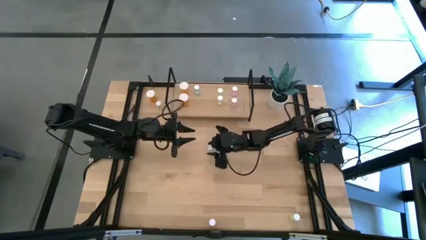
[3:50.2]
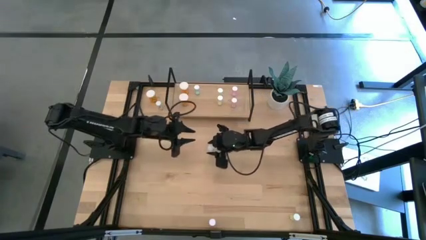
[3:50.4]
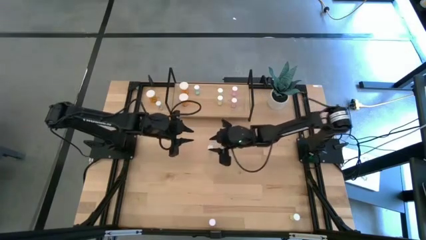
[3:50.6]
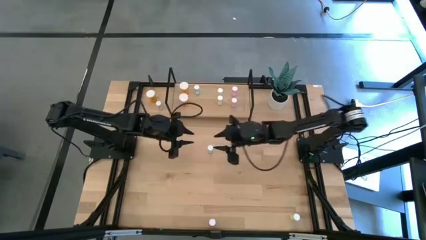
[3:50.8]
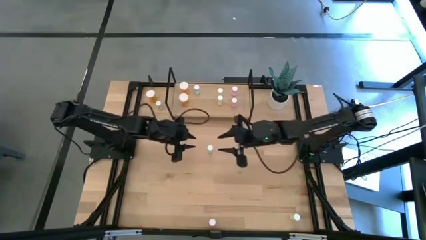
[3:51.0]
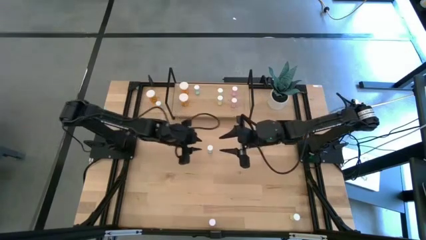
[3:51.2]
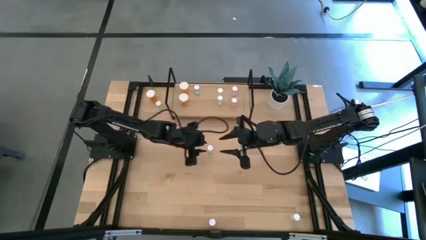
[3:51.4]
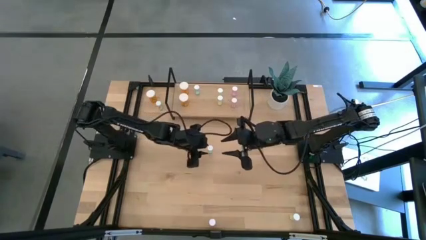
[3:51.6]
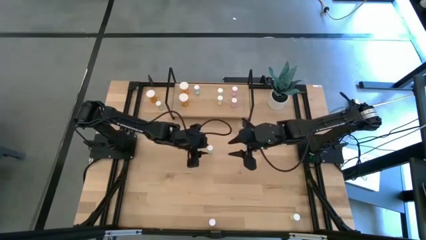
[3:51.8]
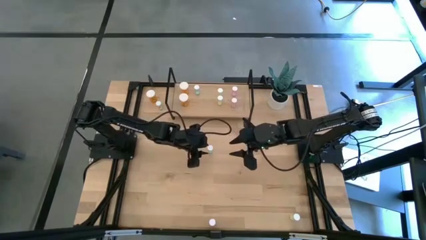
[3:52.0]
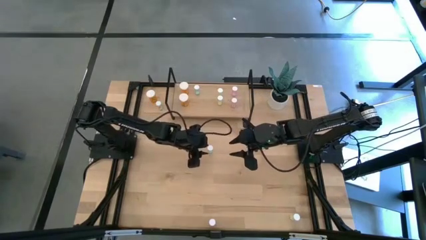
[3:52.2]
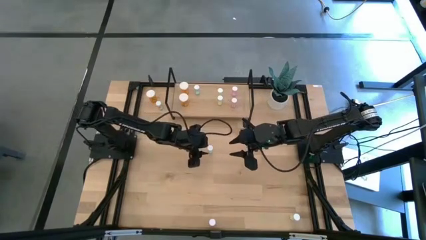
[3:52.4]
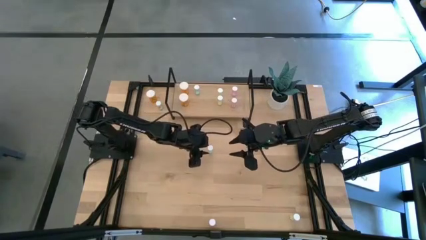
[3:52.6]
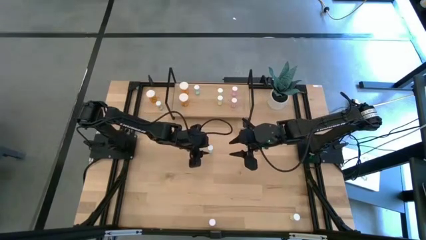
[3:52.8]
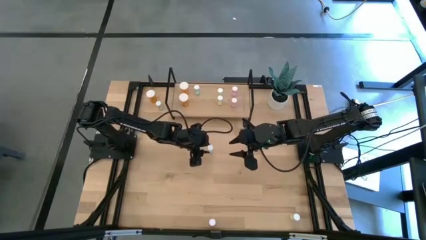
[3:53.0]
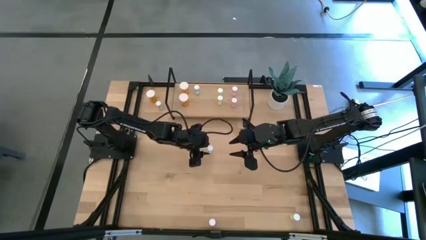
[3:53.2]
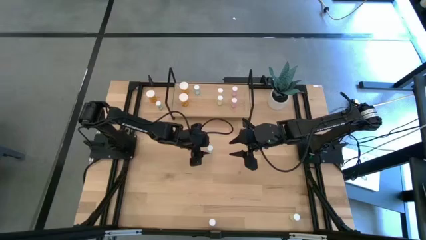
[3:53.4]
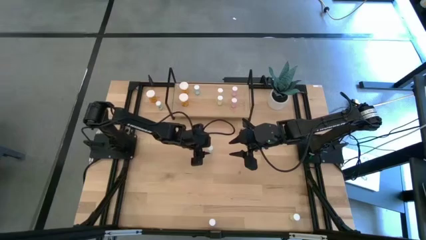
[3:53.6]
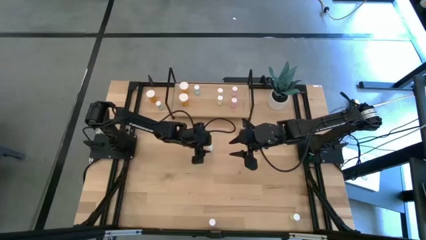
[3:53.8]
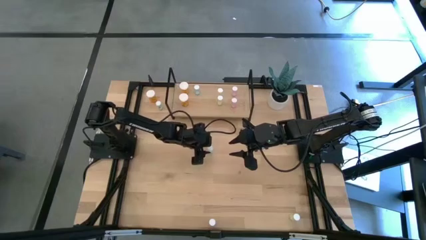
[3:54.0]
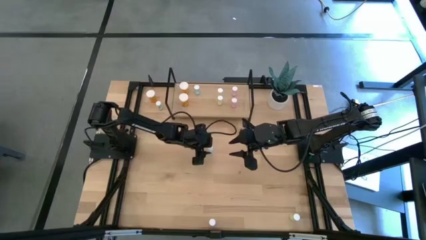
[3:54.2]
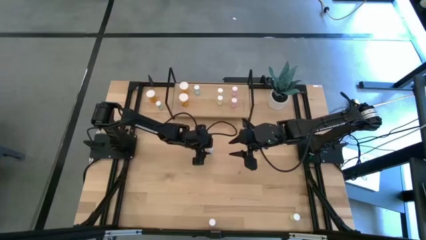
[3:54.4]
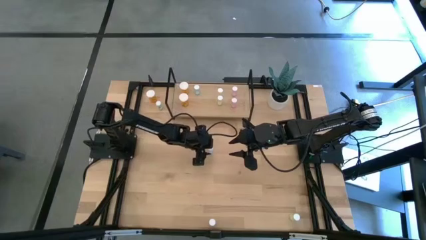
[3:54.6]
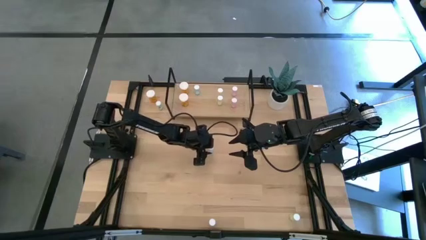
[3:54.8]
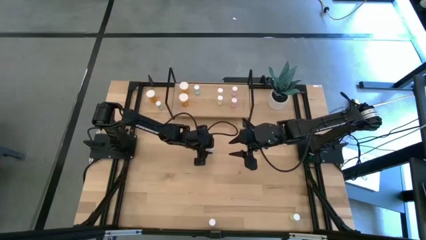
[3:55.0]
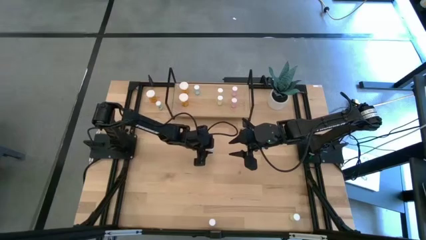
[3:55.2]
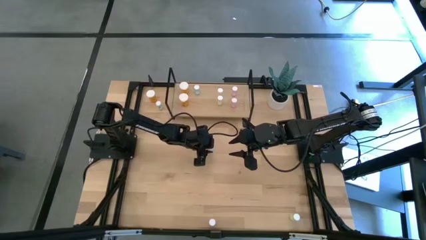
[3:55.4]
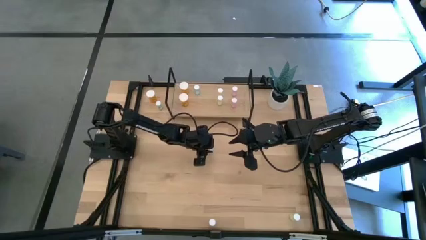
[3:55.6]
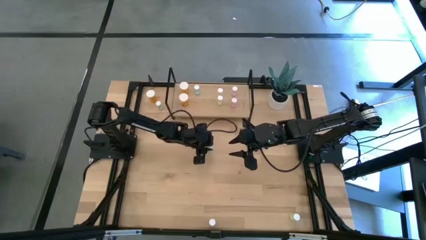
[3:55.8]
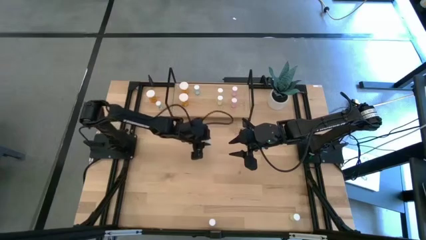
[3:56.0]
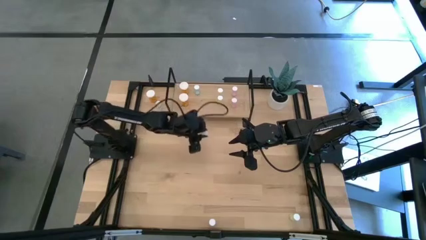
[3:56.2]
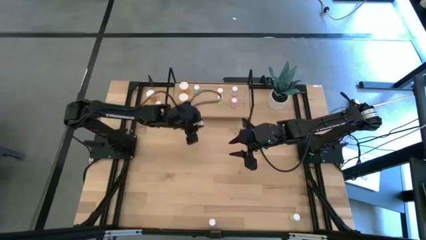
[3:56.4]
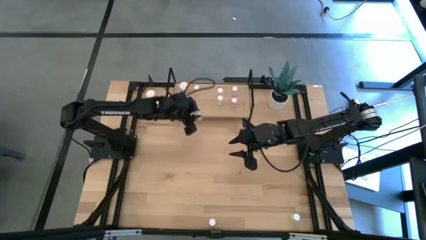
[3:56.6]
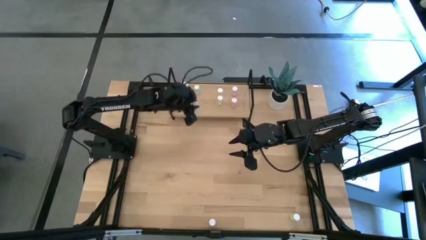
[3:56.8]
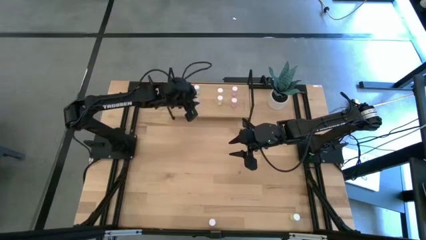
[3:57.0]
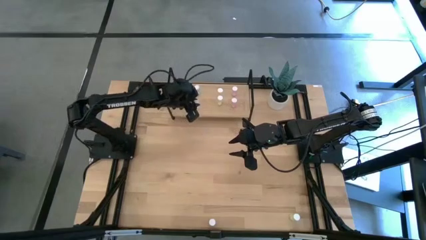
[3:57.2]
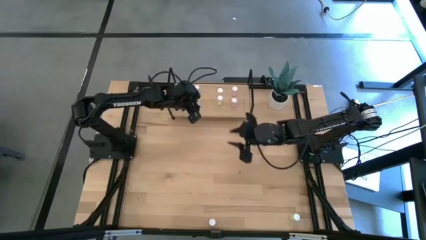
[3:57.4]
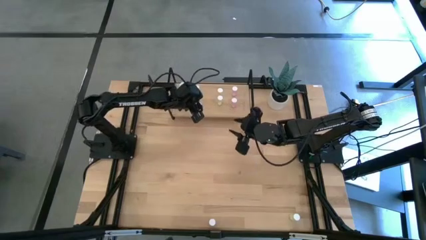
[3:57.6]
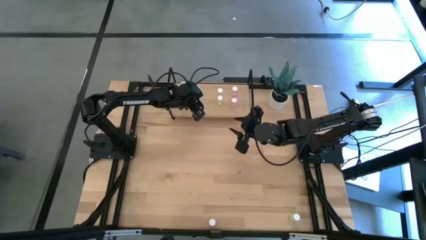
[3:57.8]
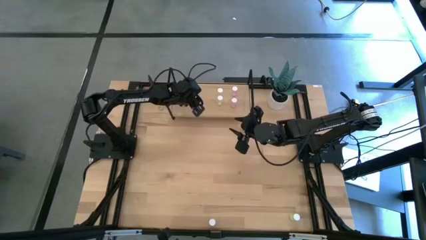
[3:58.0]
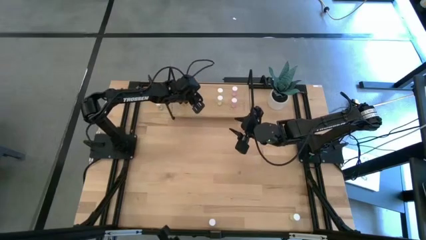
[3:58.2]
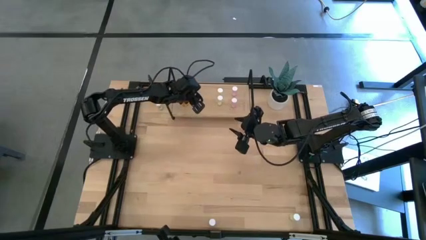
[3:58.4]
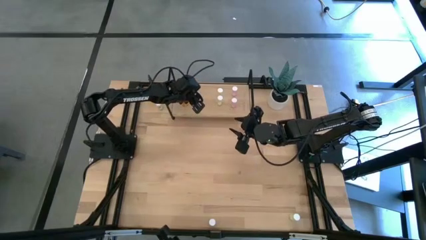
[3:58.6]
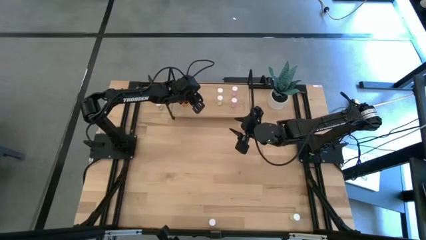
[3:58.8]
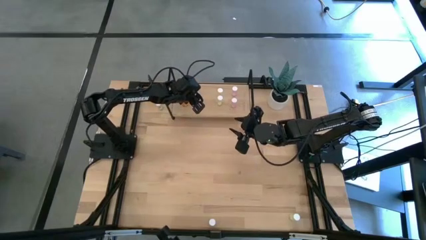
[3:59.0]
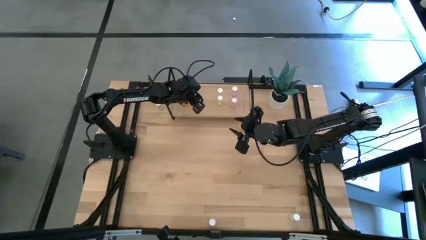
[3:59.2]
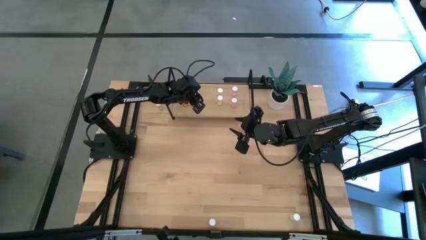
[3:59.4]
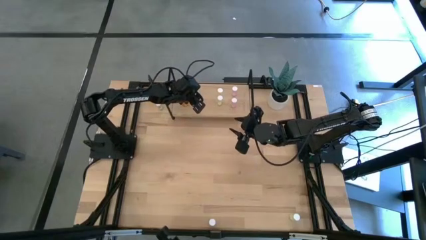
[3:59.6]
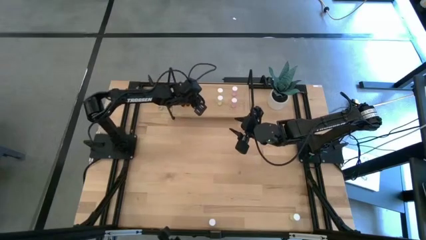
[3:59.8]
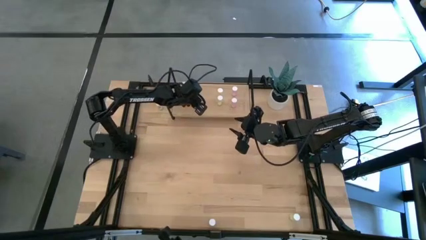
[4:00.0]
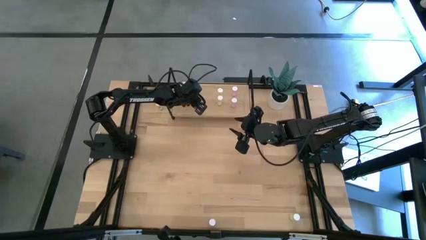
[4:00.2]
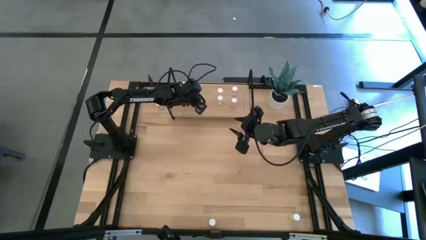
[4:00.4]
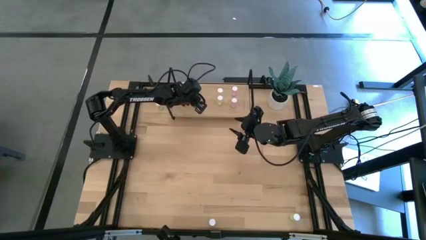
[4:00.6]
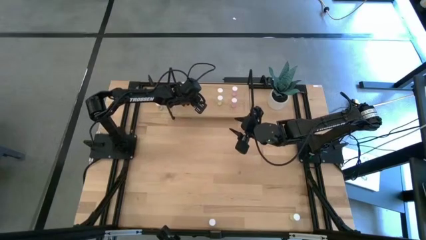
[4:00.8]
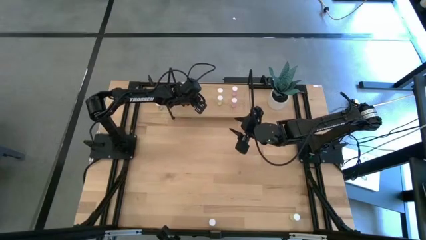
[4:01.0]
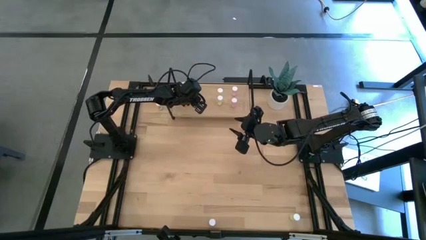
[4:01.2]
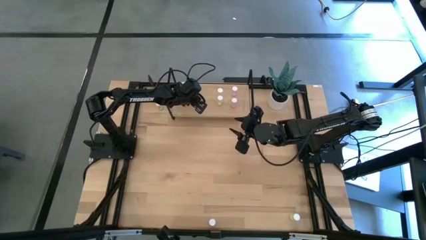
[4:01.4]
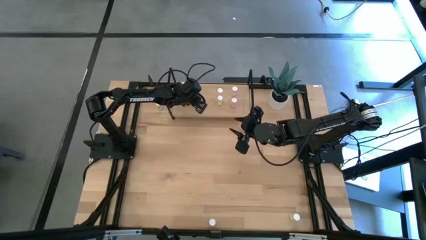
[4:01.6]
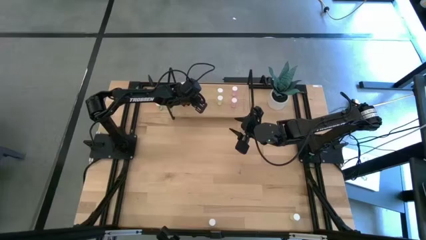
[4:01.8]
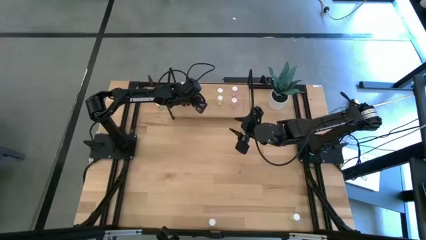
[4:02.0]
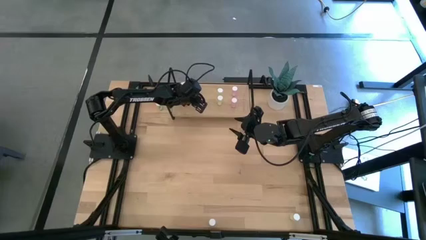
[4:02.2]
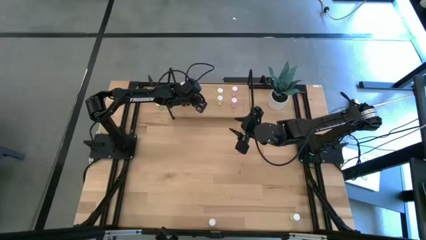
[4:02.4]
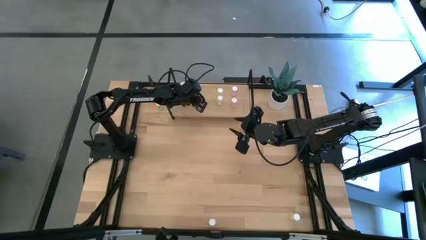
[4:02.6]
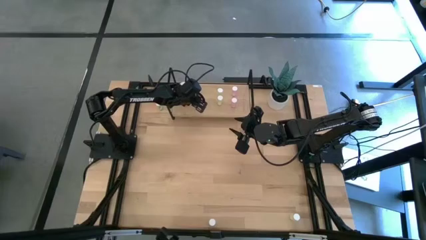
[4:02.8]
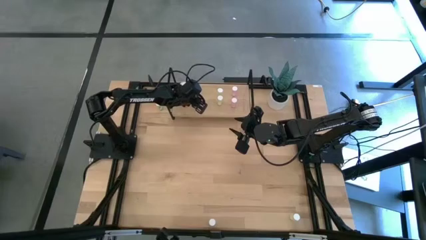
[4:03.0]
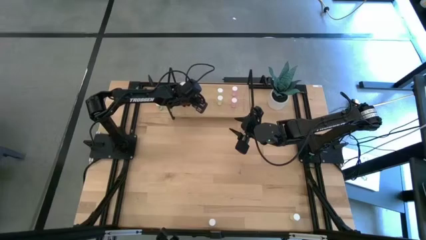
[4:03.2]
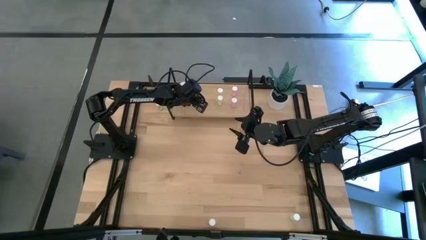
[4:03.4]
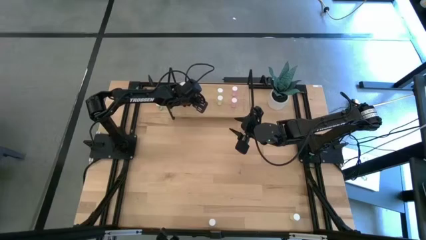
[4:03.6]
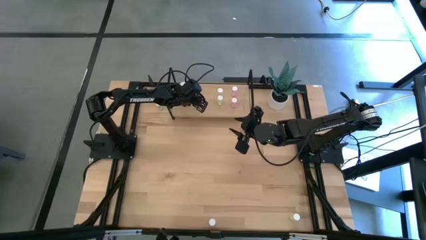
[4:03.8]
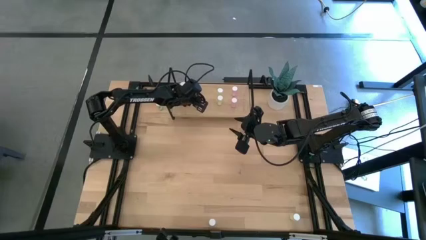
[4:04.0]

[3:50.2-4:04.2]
Task: Pick and place medicine bottles onto shelf by color
Put the right blue pill bottle on the shelf aligned with the other blue pill bottle
